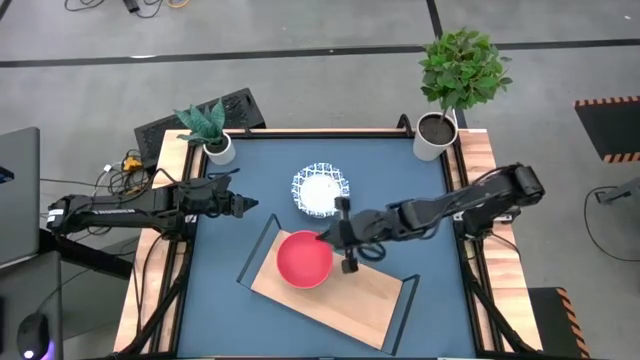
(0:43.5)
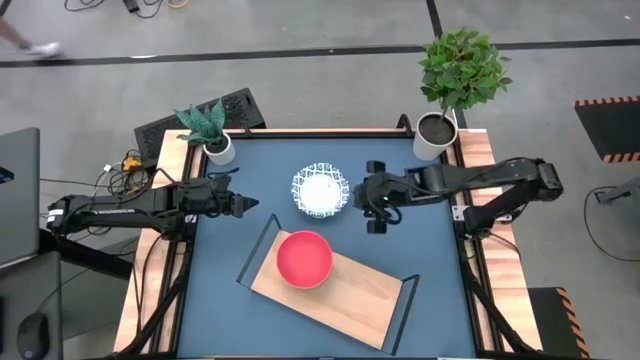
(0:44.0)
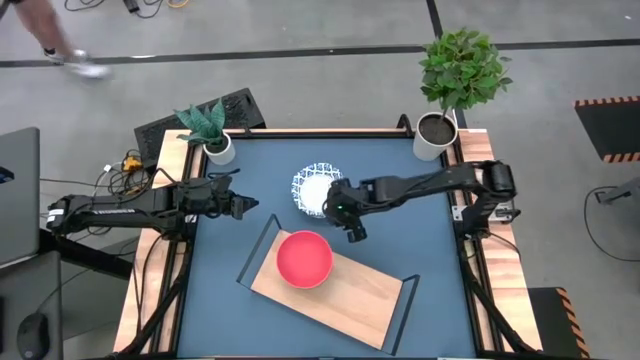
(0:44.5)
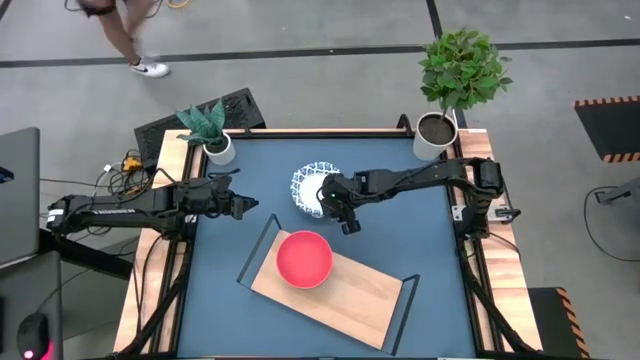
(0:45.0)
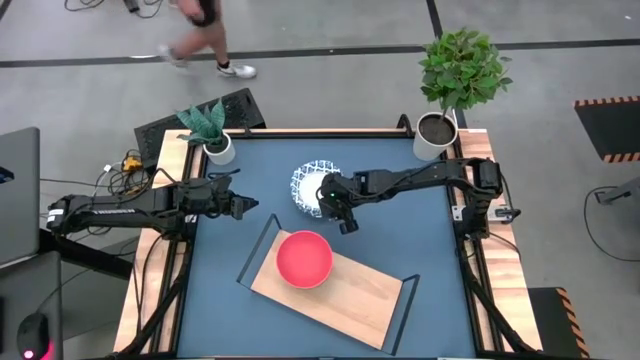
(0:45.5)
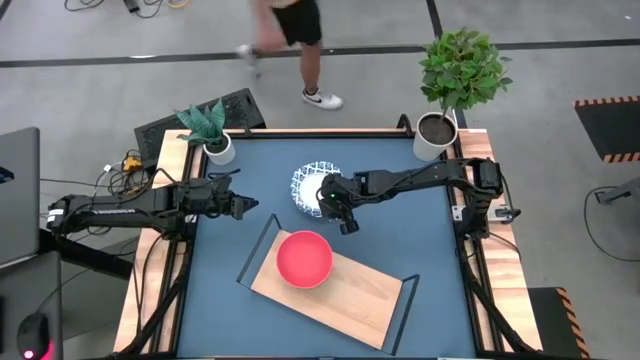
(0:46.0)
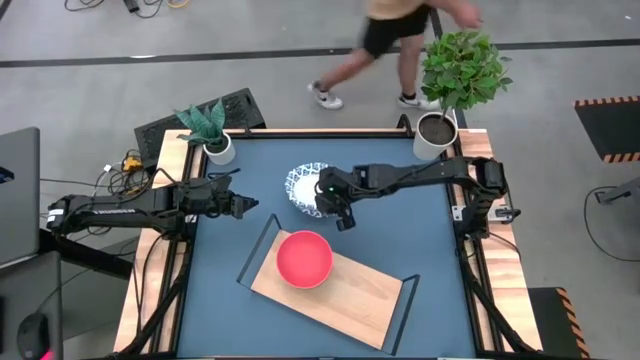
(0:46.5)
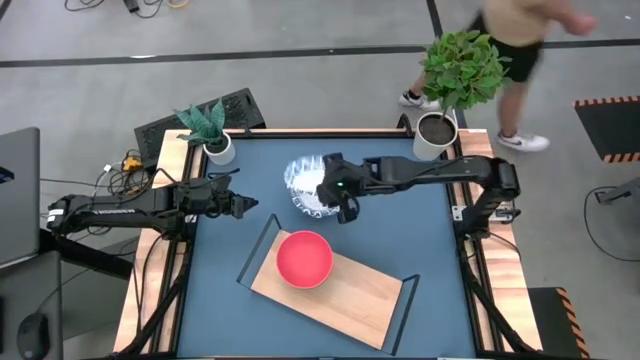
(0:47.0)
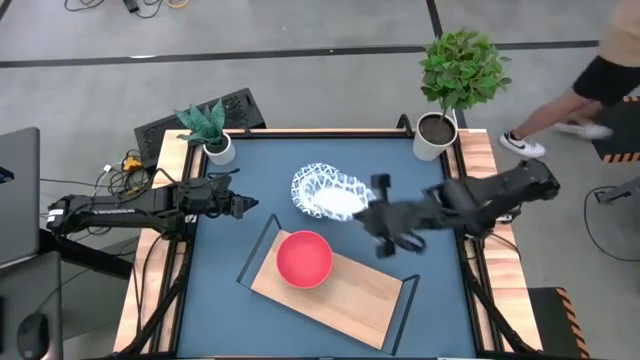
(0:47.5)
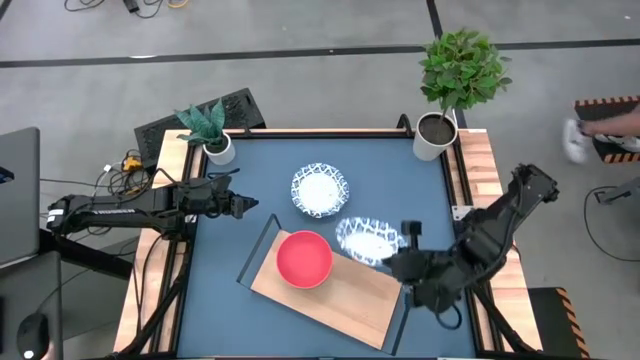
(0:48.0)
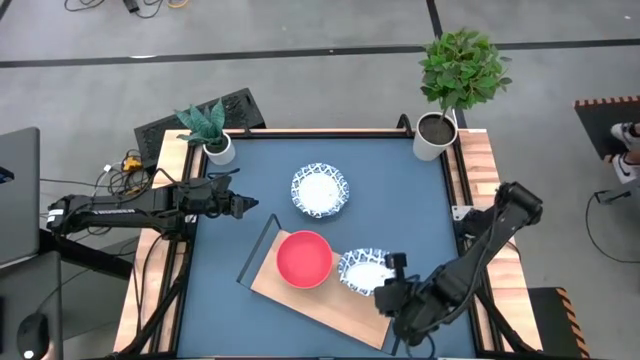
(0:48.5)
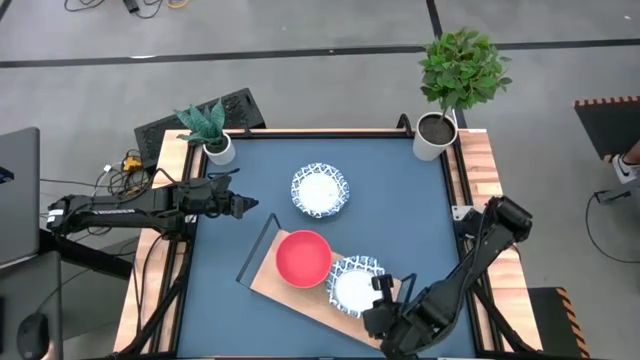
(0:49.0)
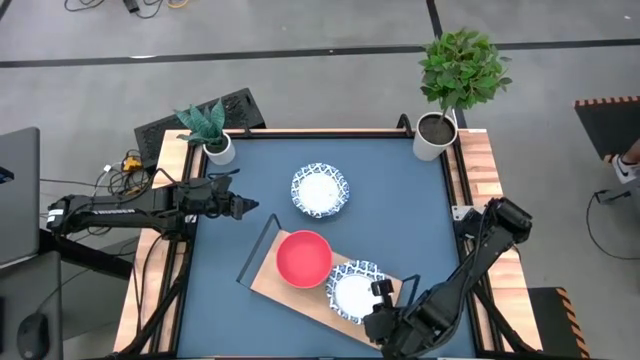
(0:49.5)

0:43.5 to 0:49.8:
Task: Place and stack bowls onto a shelf
Put the white bowl on the shelf

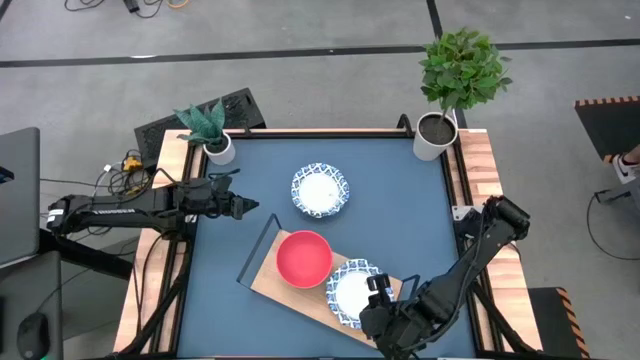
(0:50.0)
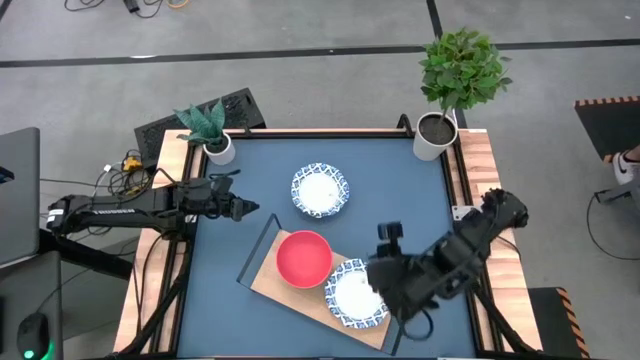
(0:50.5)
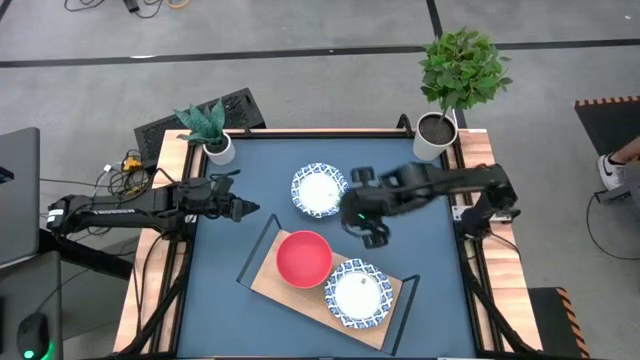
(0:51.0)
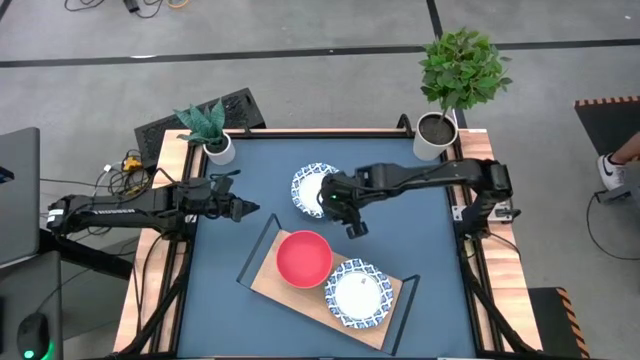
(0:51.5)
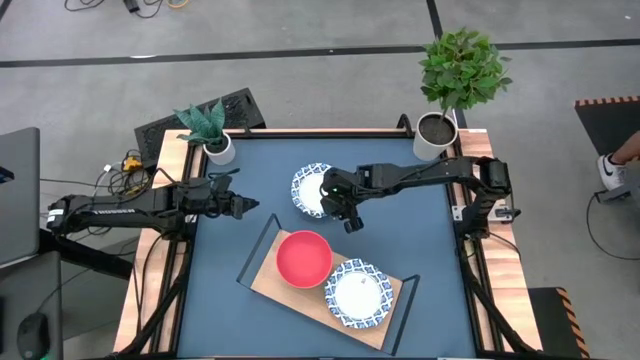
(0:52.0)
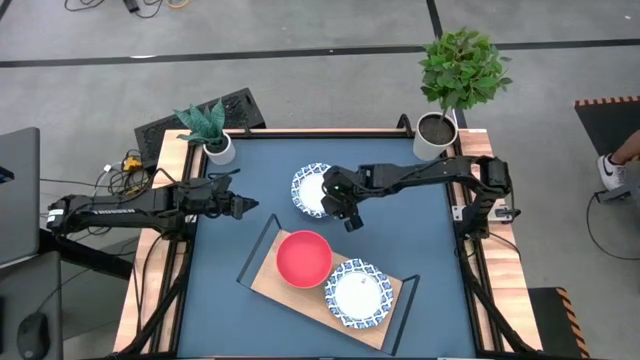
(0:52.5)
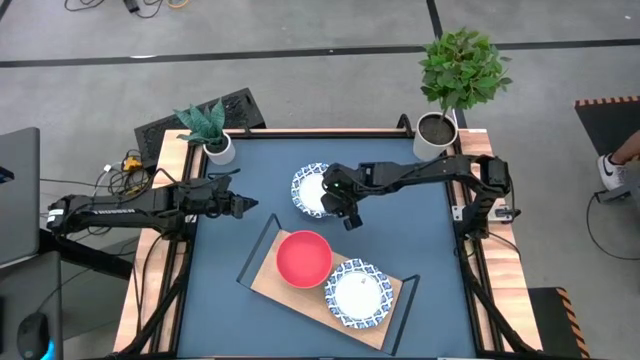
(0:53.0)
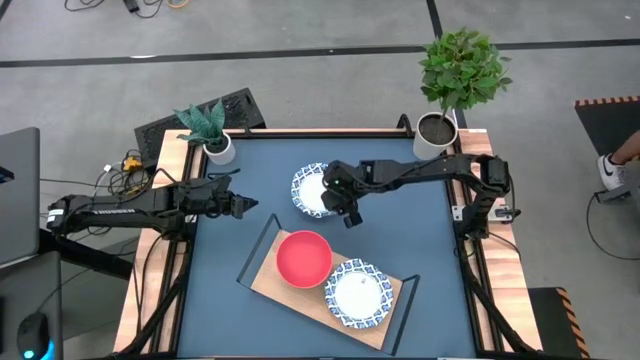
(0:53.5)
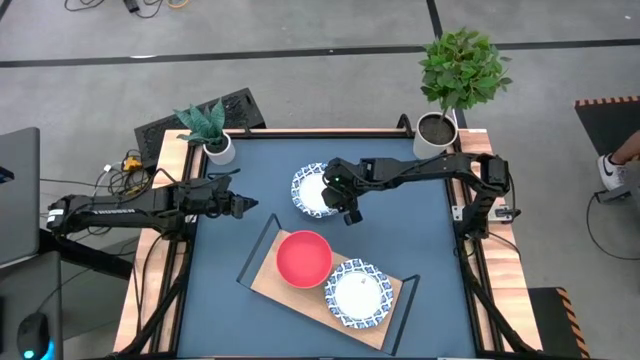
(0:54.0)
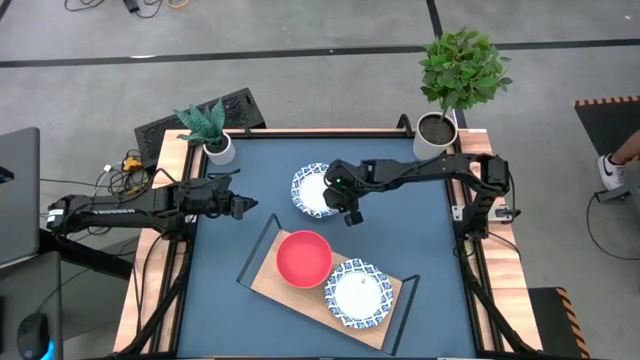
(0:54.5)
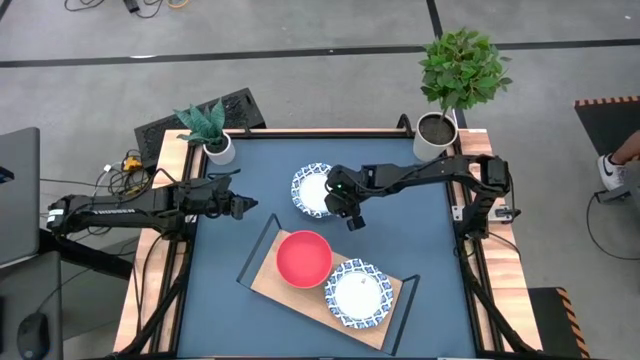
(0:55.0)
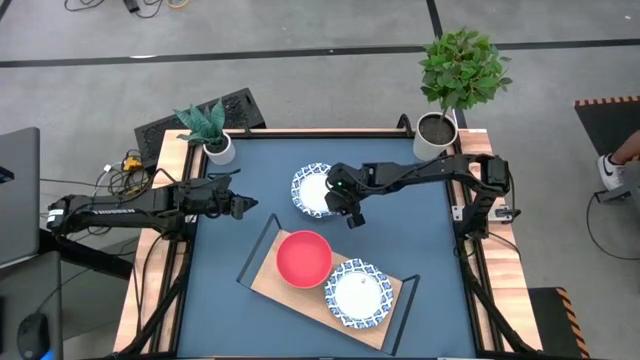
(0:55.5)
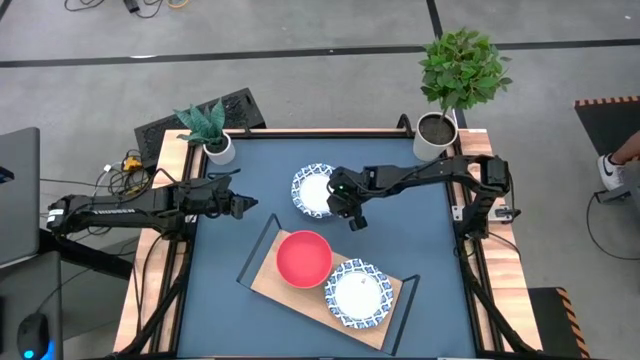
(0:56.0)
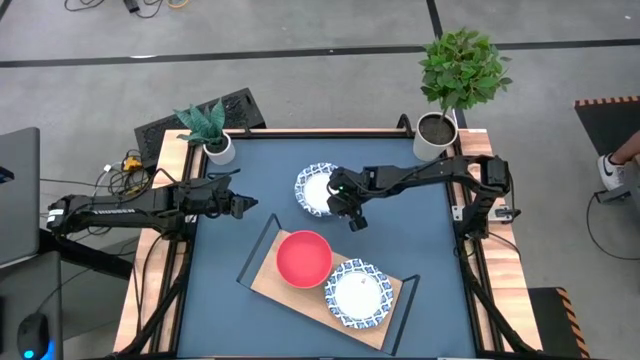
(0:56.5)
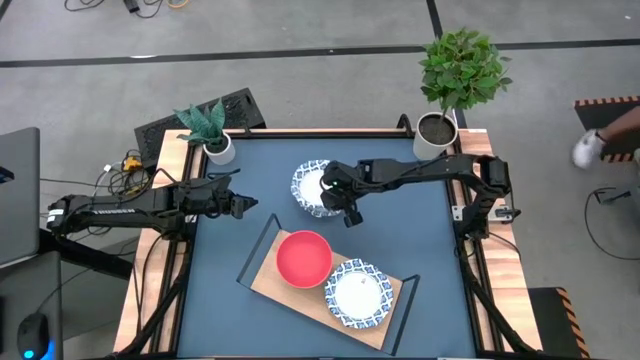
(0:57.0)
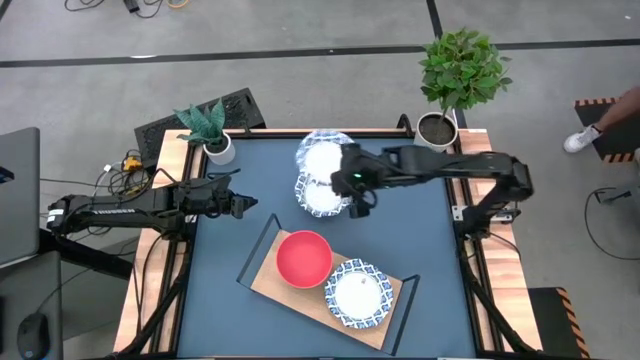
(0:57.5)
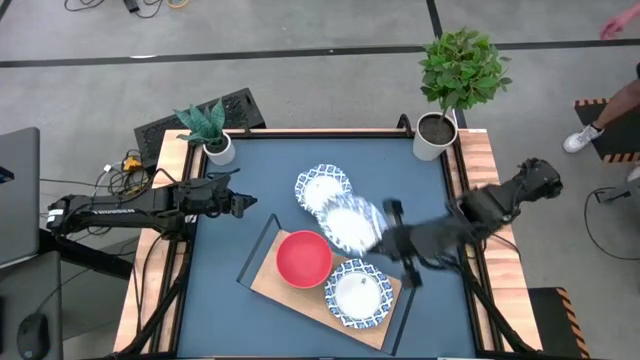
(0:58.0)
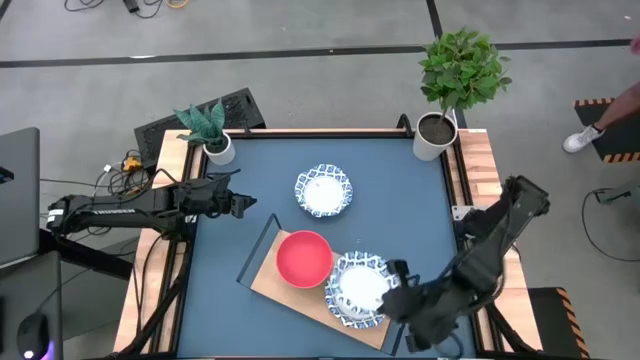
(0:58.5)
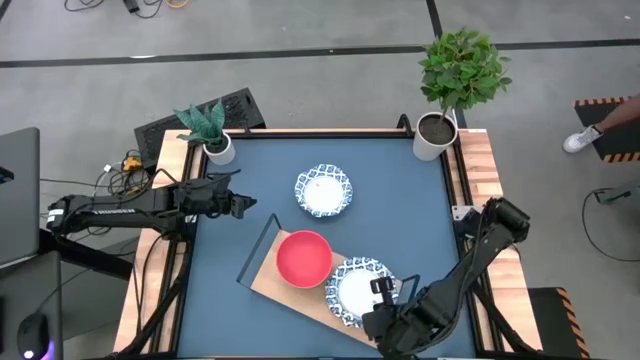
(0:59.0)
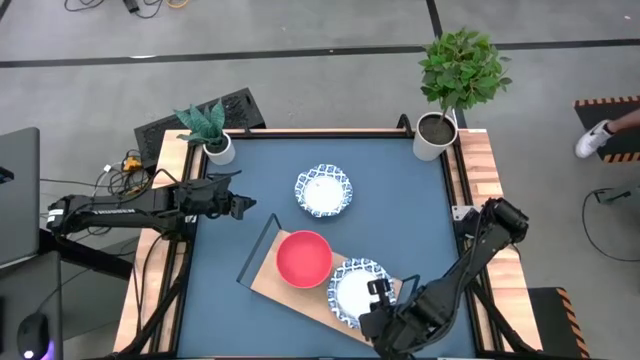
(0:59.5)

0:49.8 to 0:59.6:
Stack the white bowl on top of the other white bowl on the shelf

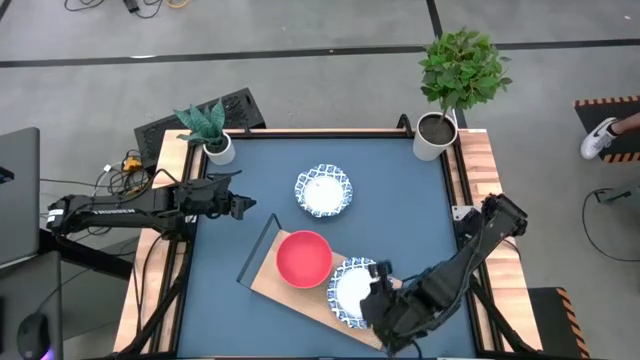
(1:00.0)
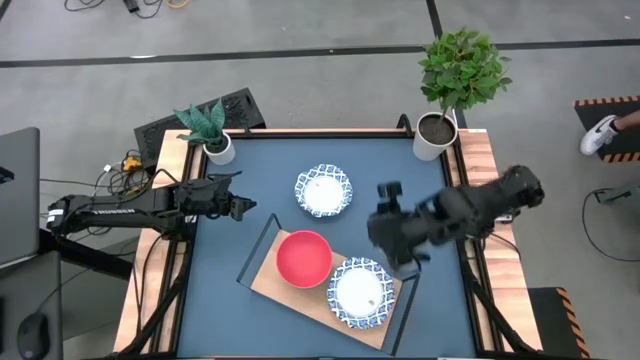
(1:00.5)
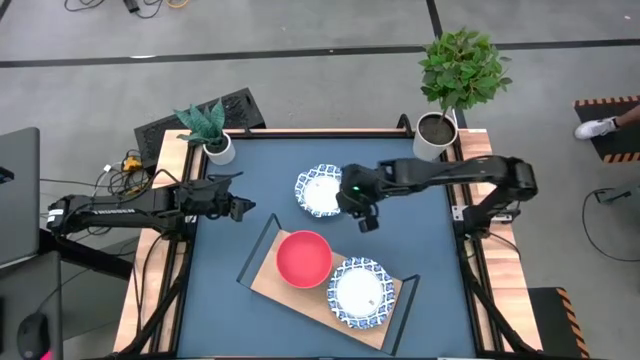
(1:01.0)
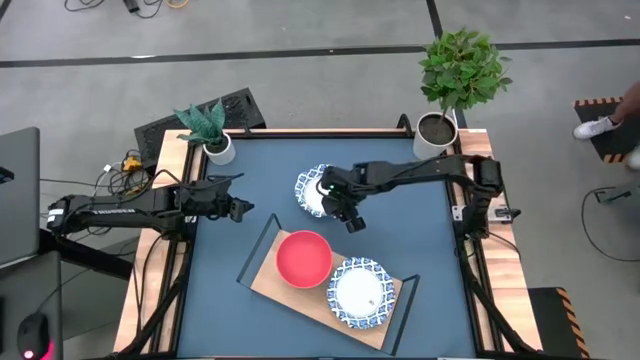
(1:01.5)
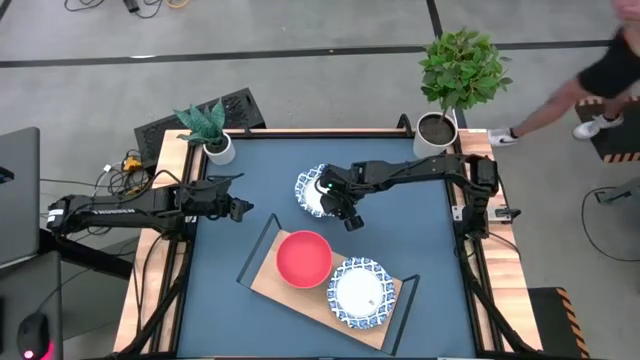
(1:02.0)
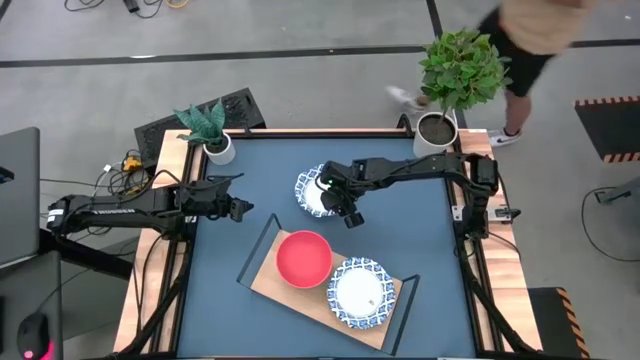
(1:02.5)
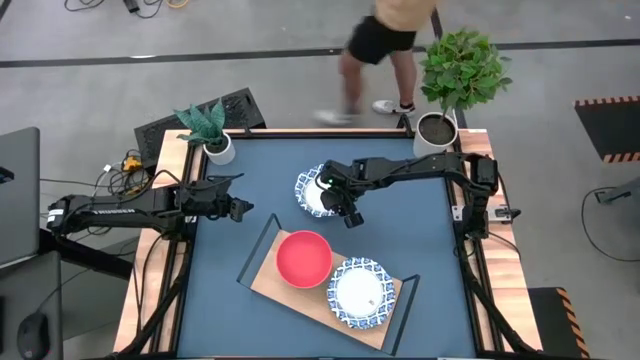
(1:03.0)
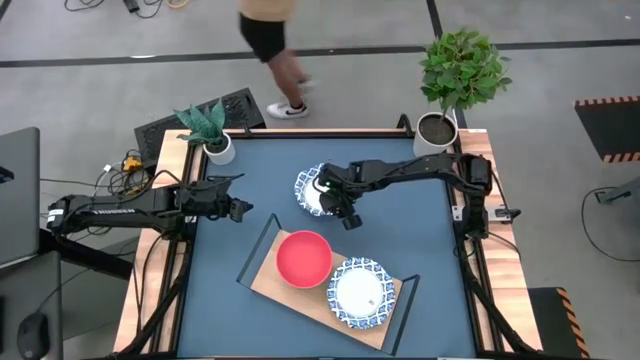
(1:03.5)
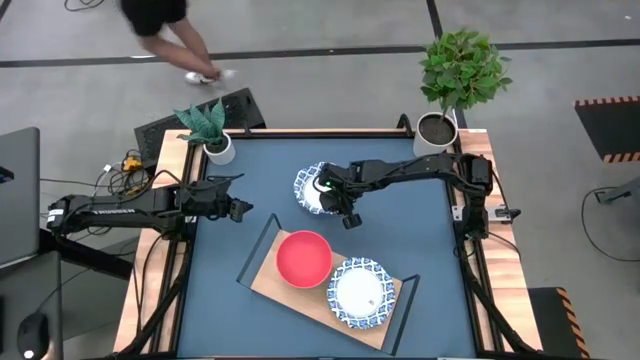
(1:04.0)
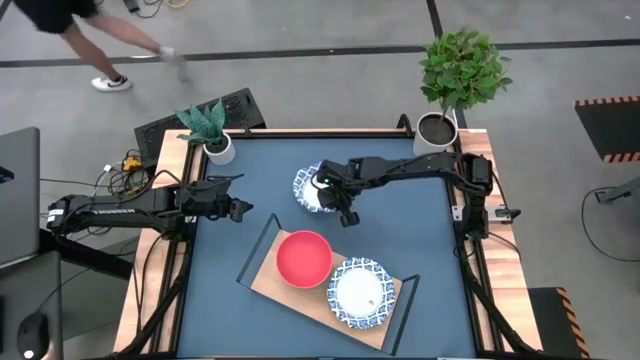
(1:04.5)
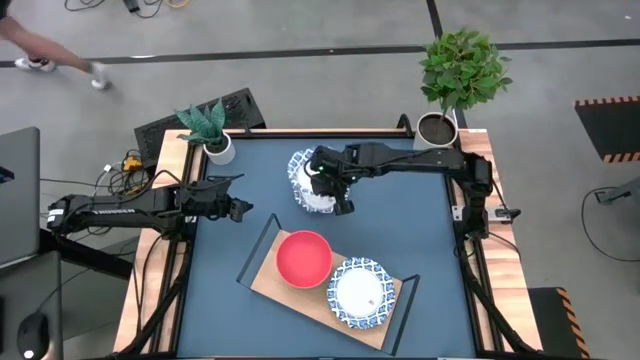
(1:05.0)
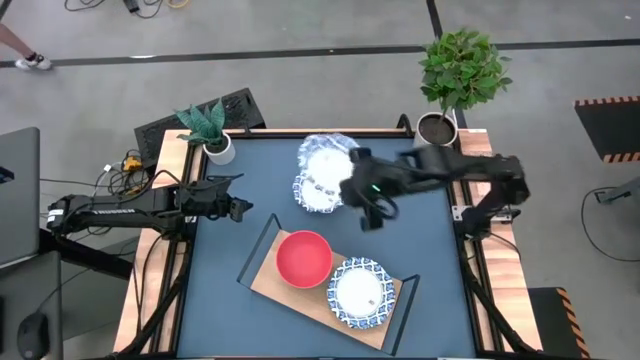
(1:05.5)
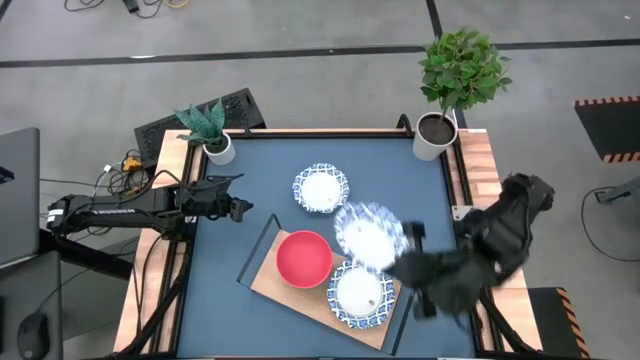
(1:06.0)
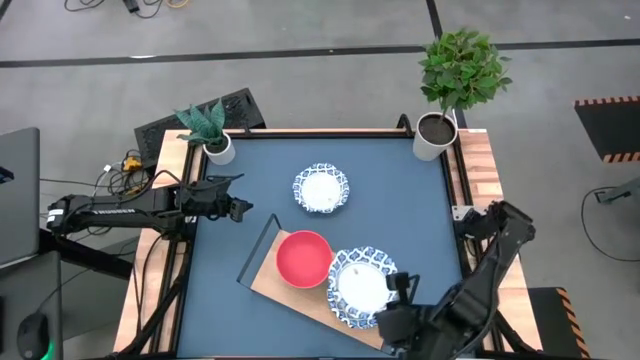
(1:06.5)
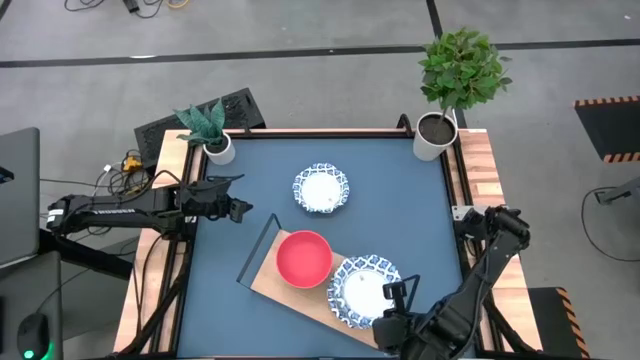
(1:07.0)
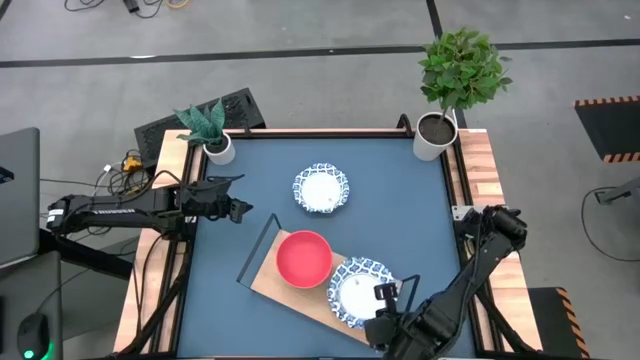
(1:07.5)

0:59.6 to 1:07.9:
Stack the white bowl on top of the other white bowls on the shelf
